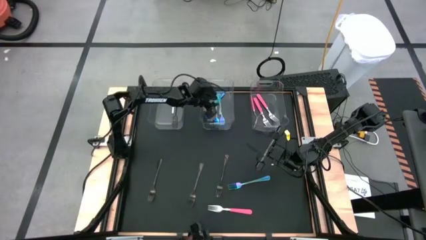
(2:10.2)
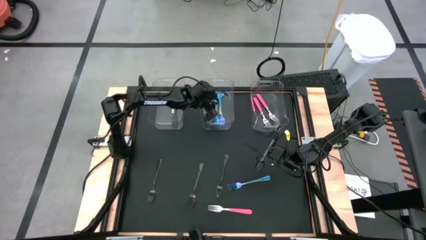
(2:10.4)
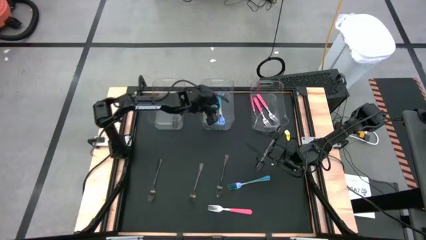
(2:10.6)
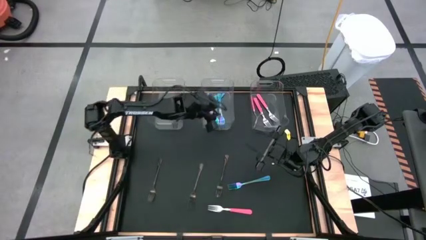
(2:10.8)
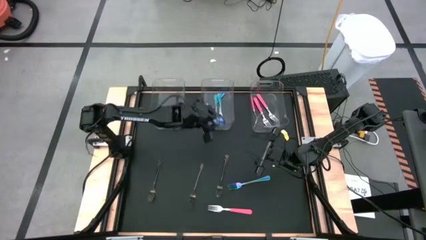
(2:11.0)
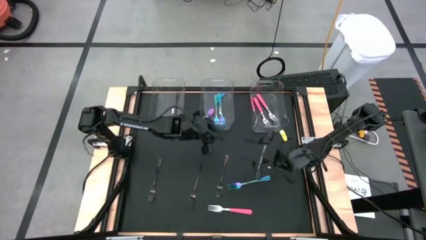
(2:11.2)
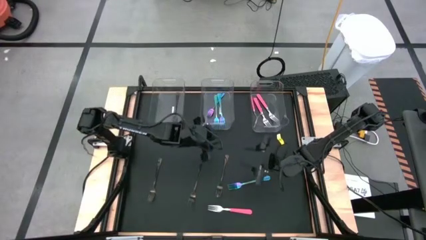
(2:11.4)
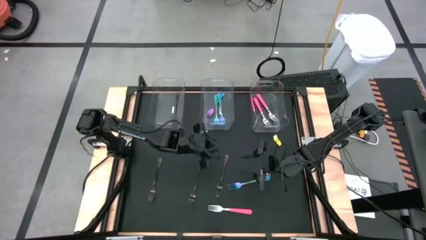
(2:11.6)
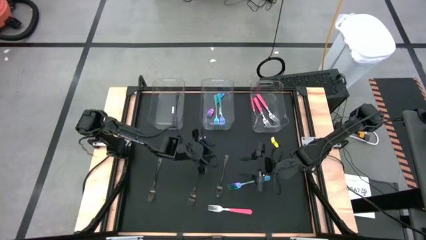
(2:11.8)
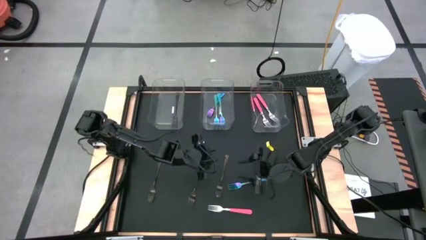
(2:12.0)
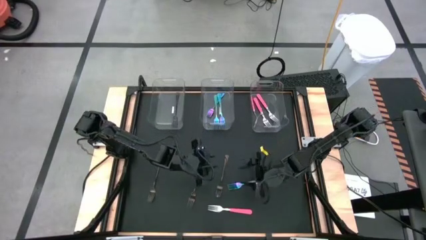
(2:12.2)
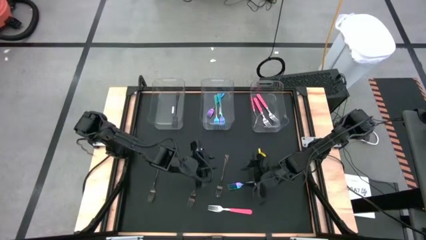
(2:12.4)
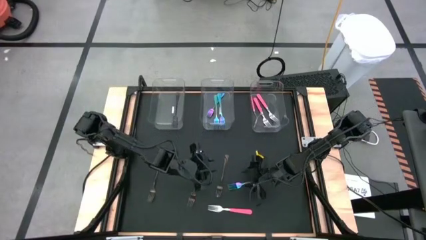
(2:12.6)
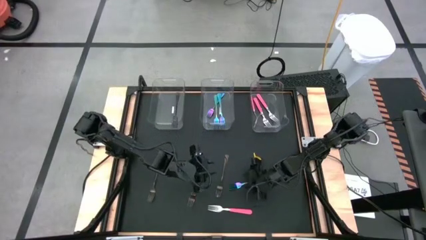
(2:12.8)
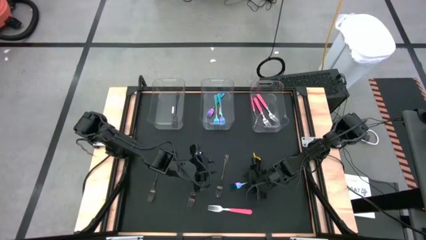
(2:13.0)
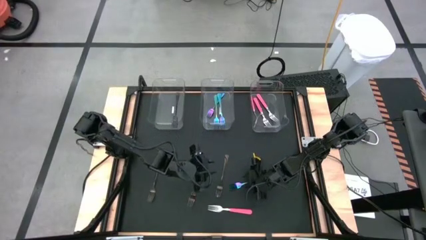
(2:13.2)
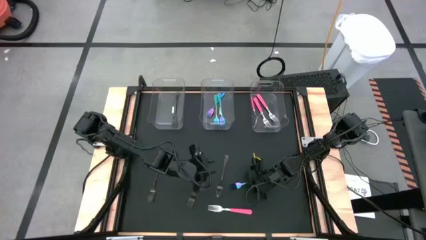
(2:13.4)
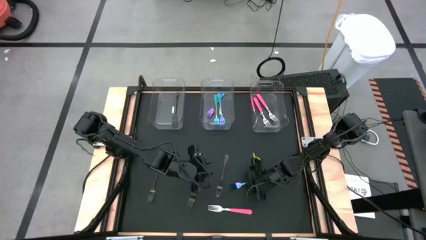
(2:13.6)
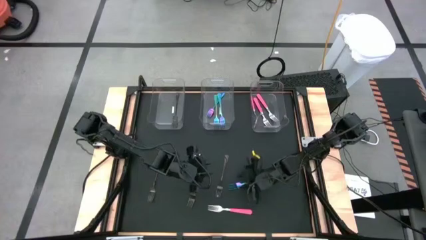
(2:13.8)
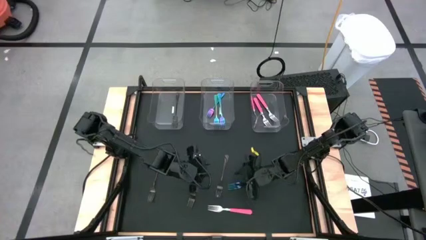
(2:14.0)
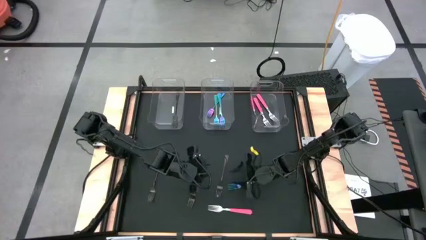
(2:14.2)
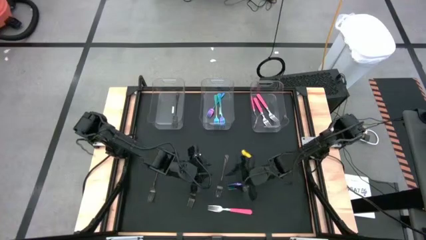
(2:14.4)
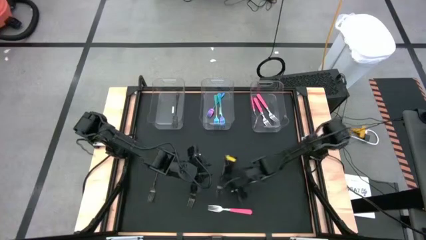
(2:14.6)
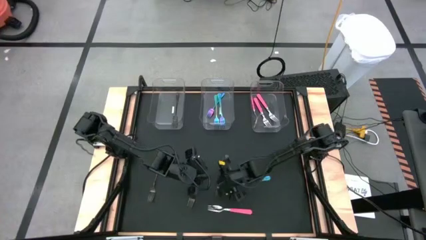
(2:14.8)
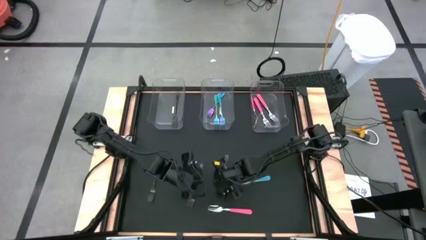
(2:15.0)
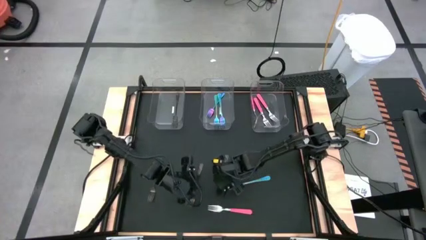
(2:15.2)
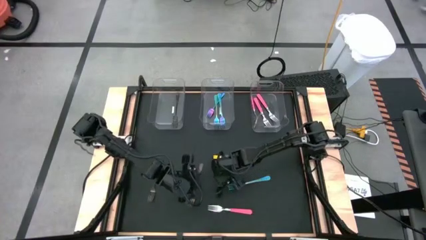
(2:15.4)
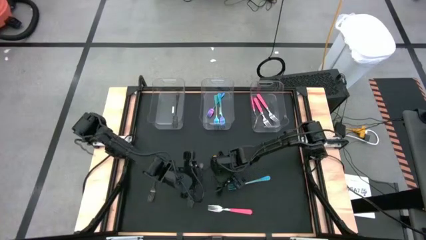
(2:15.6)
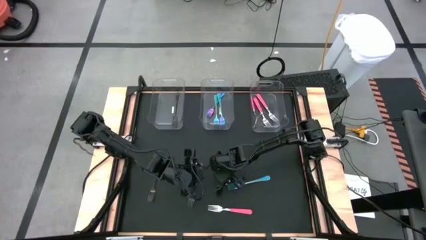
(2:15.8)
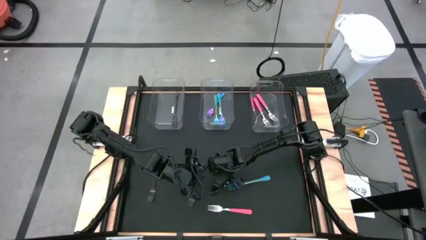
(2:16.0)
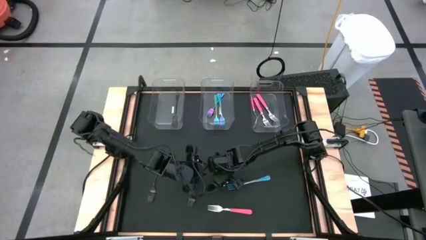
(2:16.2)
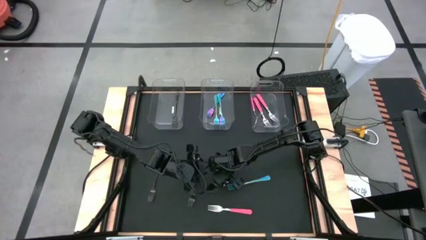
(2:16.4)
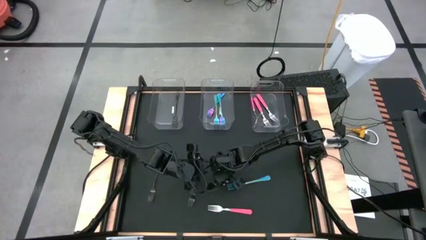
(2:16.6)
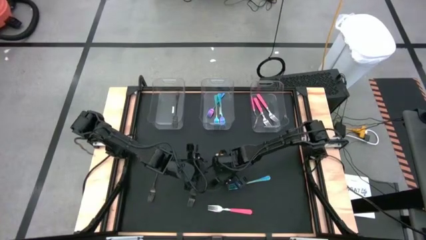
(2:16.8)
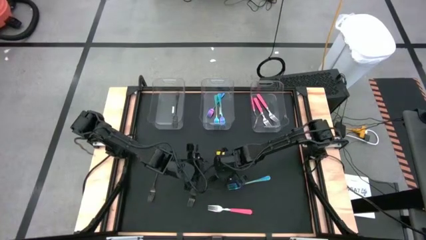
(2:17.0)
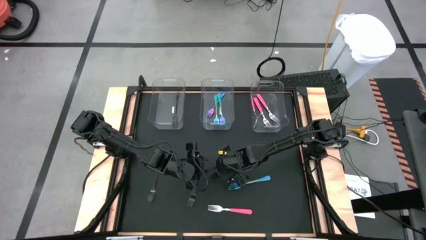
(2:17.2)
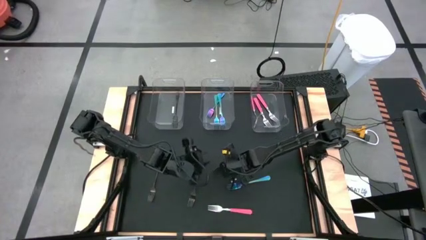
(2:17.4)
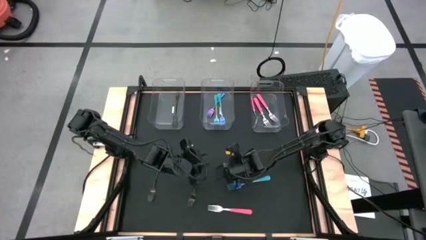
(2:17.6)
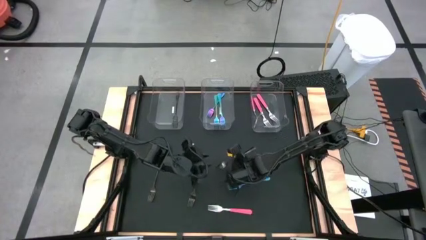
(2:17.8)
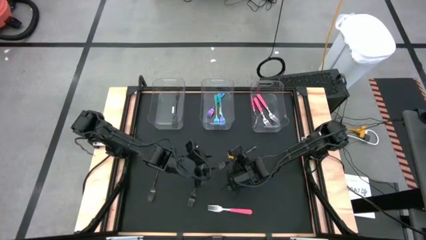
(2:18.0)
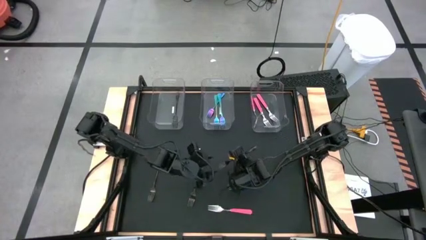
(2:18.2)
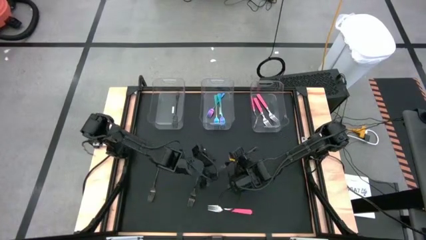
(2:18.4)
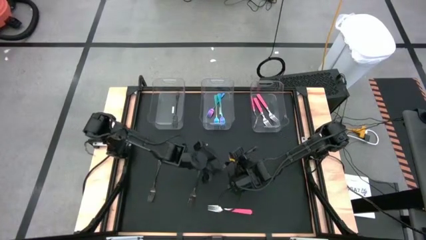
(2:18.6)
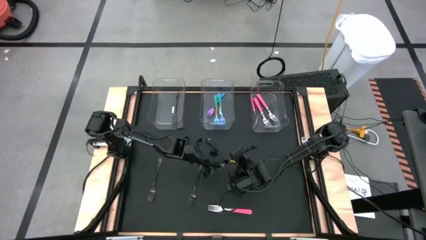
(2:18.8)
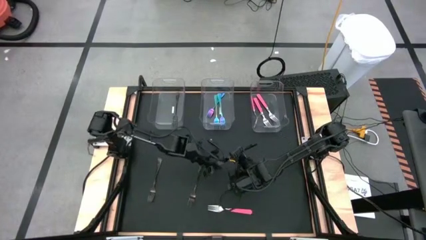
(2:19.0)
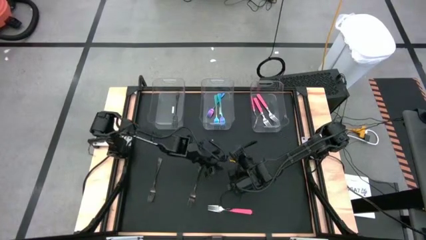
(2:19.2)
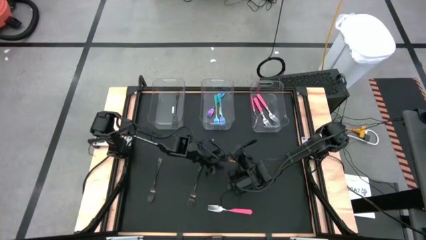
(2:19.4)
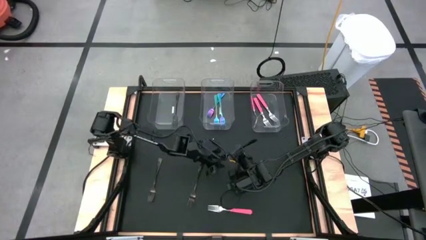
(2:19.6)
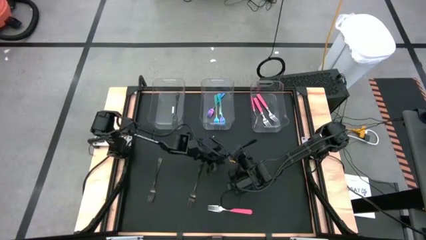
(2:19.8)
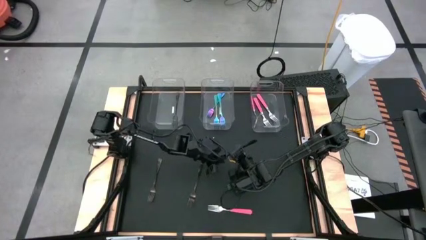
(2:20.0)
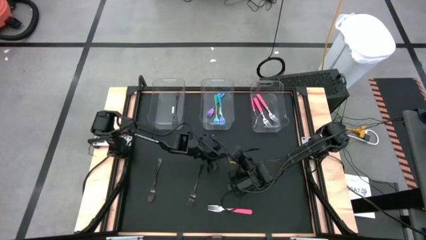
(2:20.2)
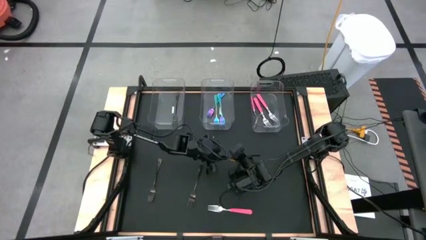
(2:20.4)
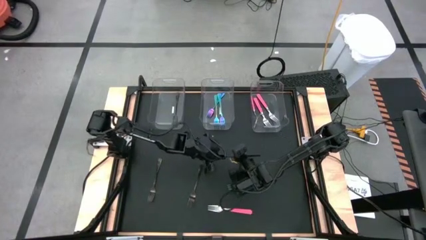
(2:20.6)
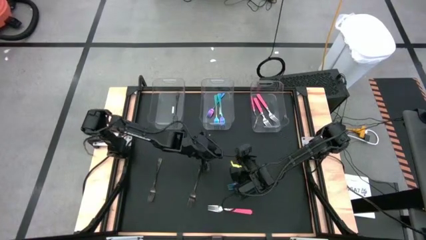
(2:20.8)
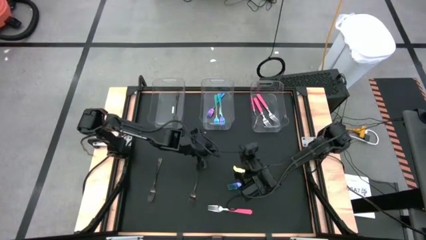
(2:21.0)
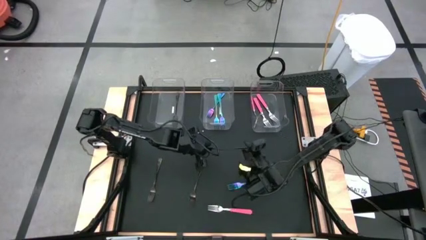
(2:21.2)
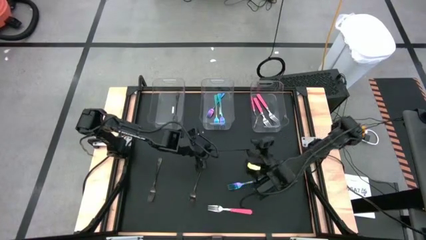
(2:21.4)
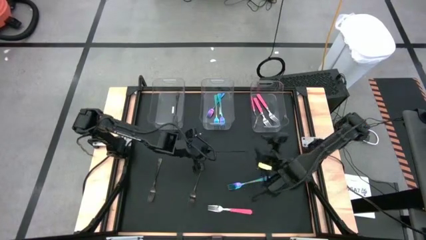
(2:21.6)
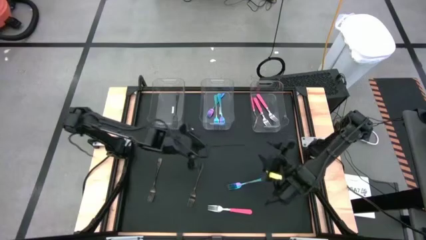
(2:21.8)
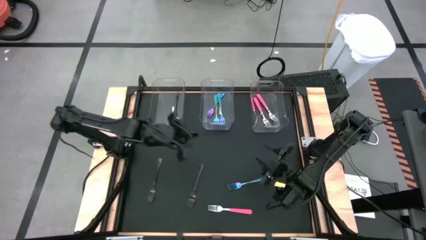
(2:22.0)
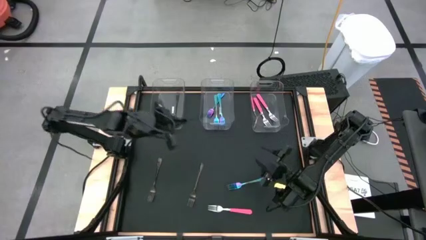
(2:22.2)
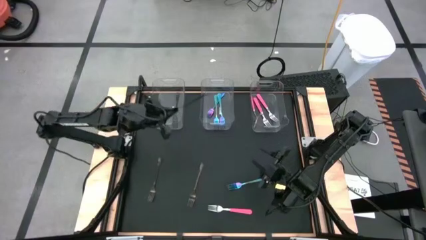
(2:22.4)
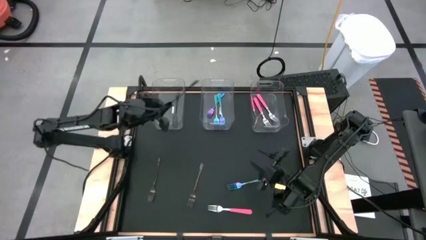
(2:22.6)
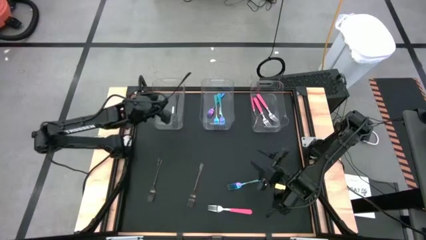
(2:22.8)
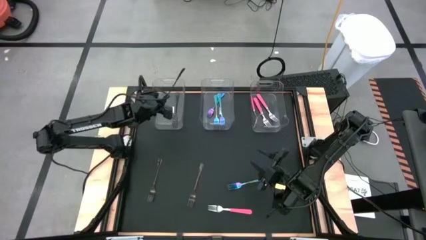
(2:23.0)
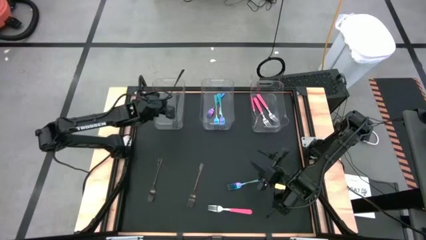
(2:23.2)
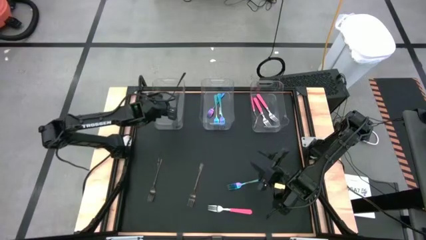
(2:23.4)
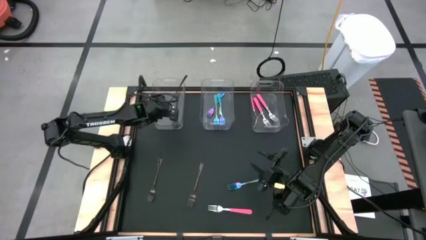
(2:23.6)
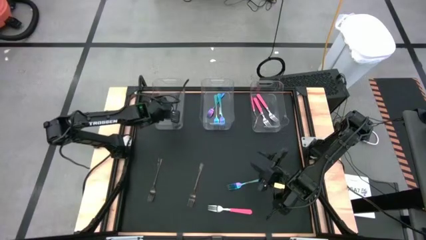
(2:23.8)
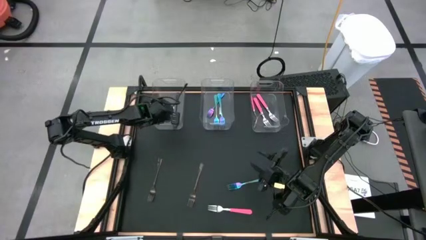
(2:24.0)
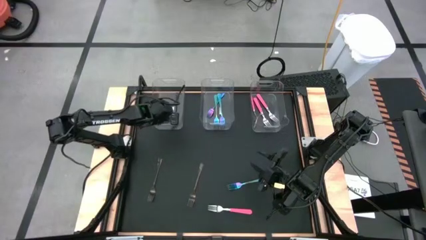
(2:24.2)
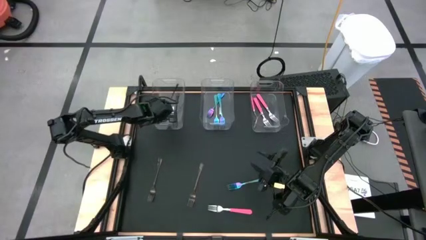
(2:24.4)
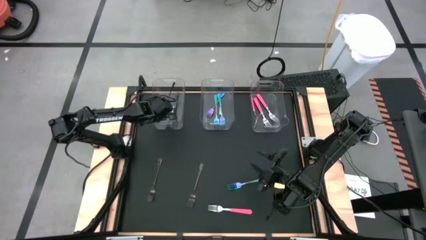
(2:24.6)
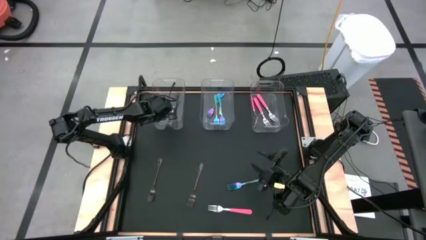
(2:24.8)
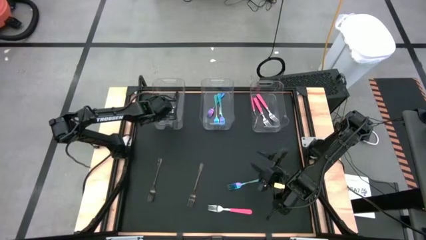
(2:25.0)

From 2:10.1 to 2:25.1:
Task: Sort silverware by color (type)
Put the black fork into the left transparent bin

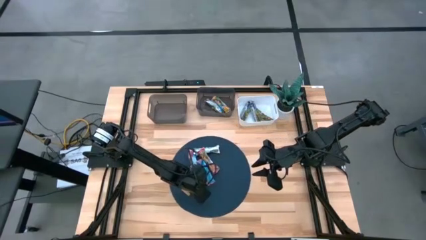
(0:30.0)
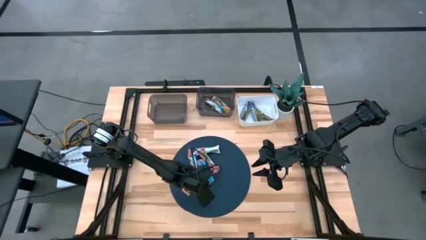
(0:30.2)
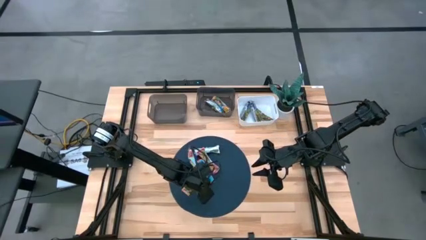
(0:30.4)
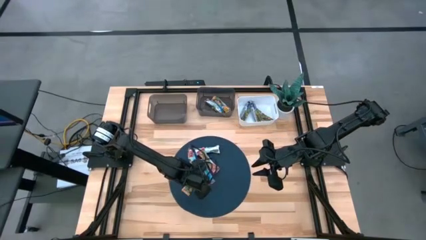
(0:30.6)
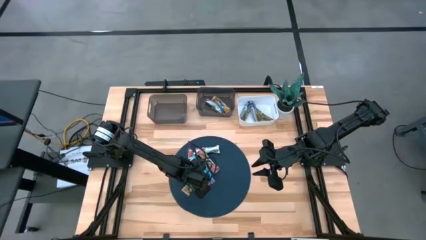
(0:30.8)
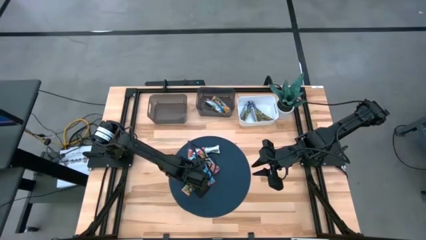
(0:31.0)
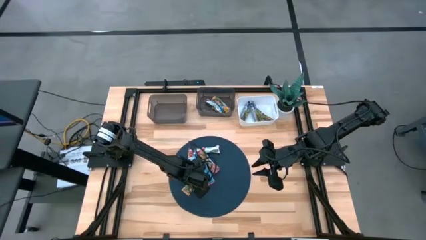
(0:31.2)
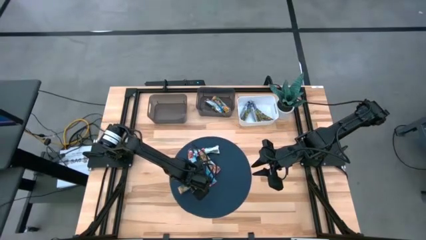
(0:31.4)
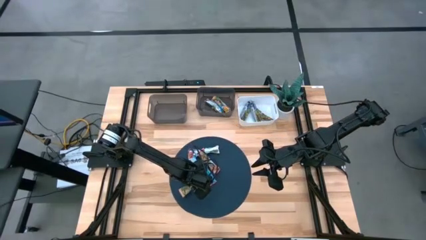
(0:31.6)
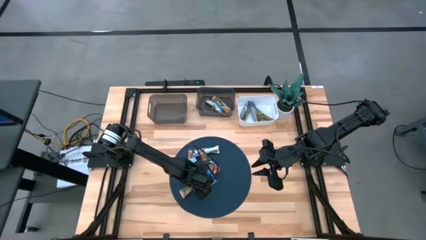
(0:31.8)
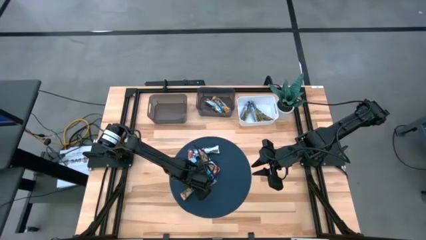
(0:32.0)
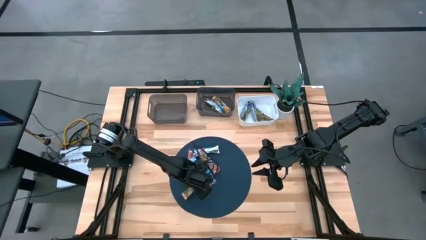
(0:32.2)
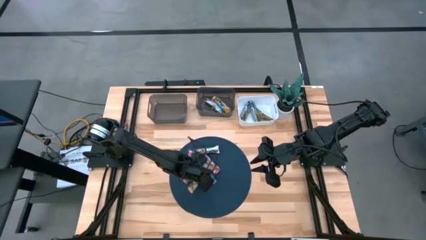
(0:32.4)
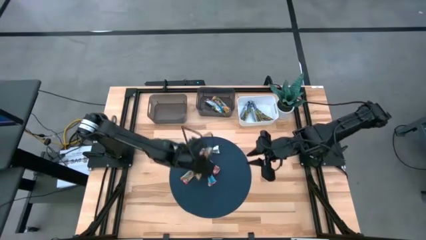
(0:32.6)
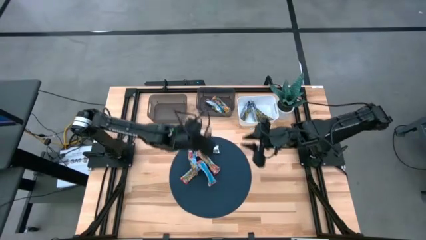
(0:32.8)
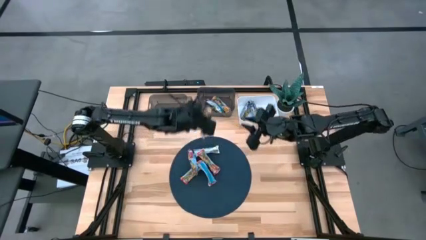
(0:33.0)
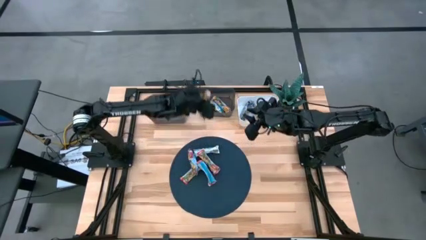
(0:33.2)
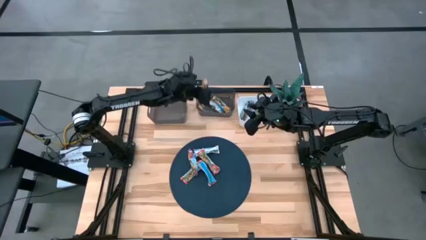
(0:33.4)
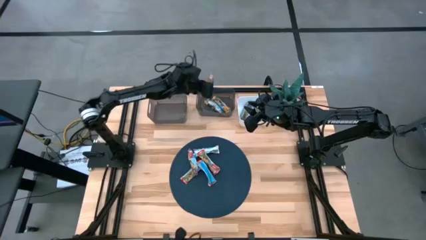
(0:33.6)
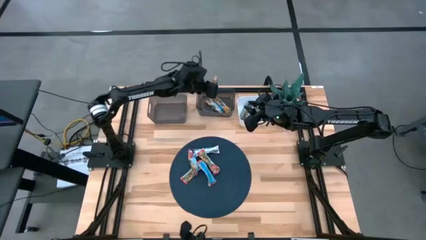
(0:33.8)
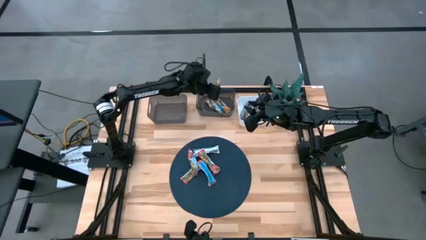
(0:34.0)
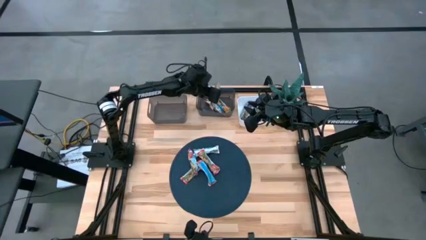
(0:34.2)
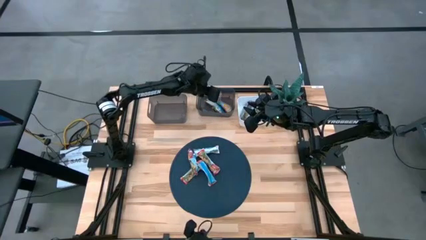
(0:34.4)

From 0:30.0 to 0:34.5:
Task: Pick and place Granola Bars by type
Put the yellow granola bar into the right black bin
